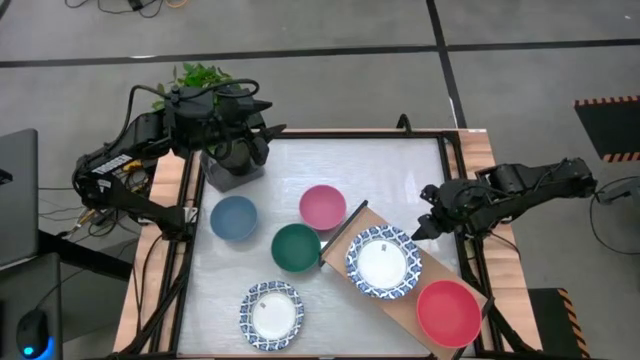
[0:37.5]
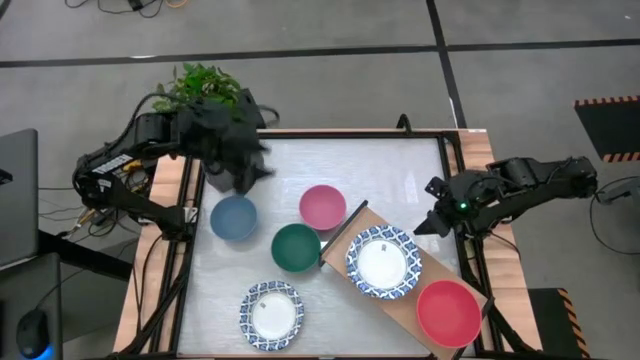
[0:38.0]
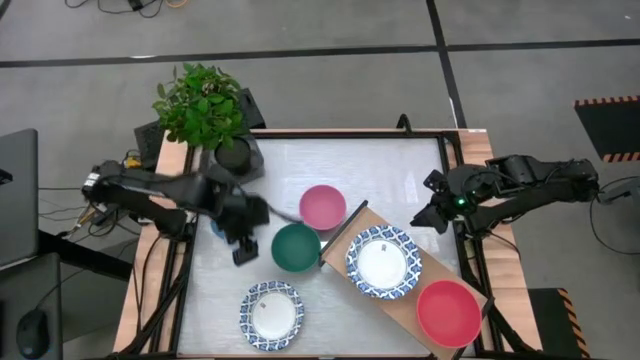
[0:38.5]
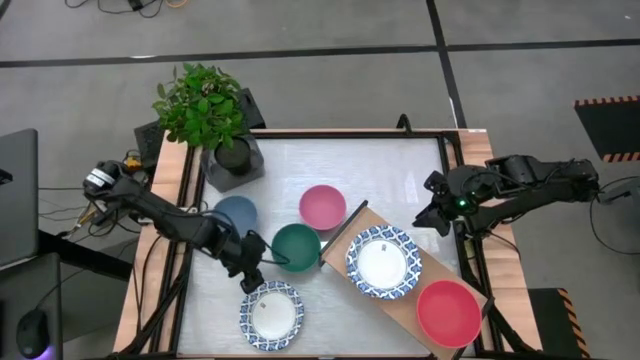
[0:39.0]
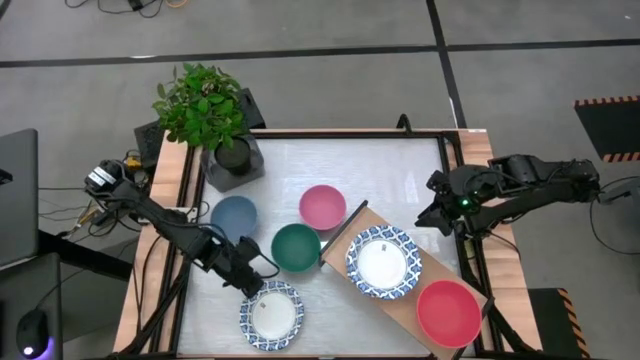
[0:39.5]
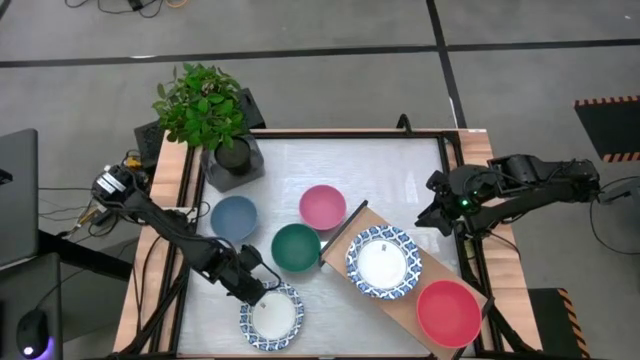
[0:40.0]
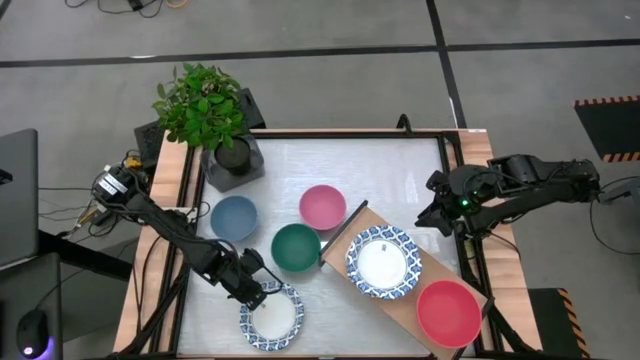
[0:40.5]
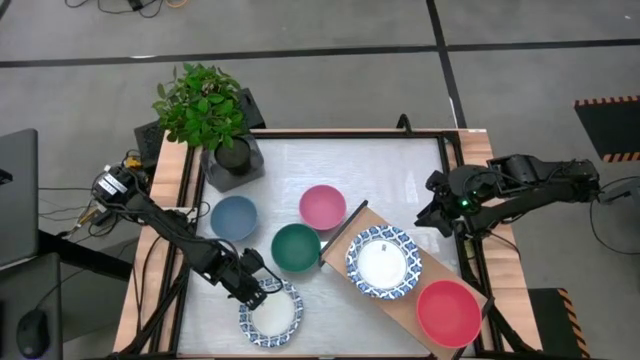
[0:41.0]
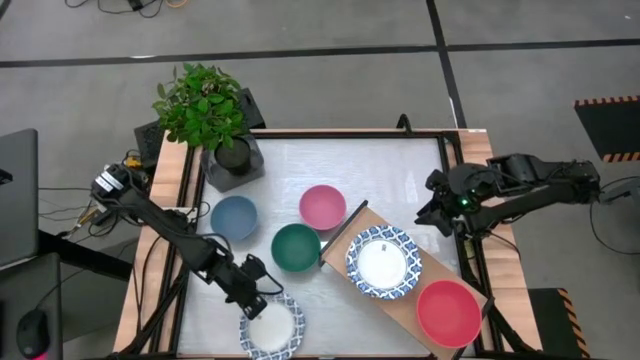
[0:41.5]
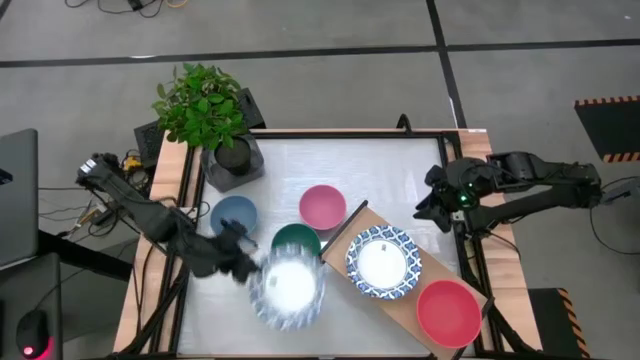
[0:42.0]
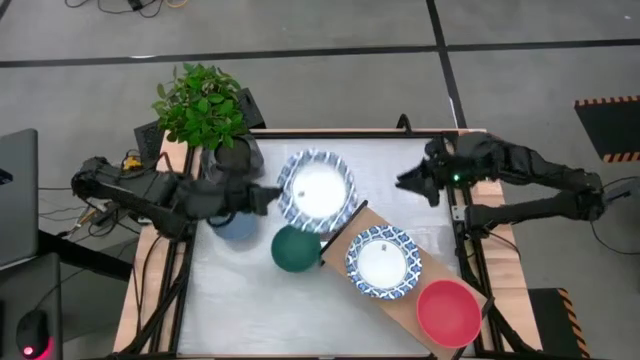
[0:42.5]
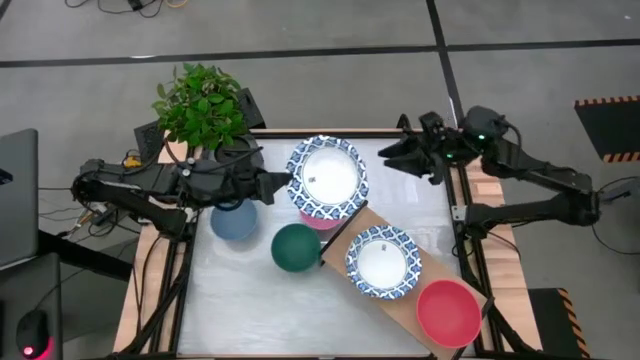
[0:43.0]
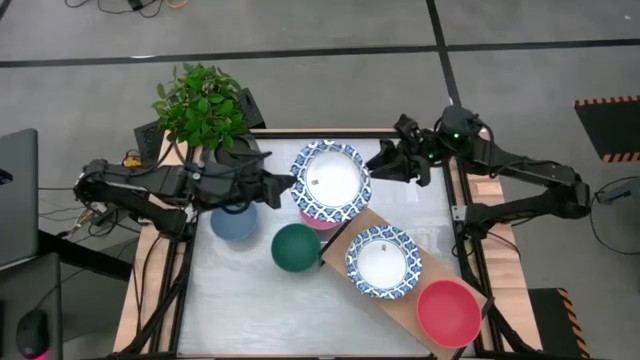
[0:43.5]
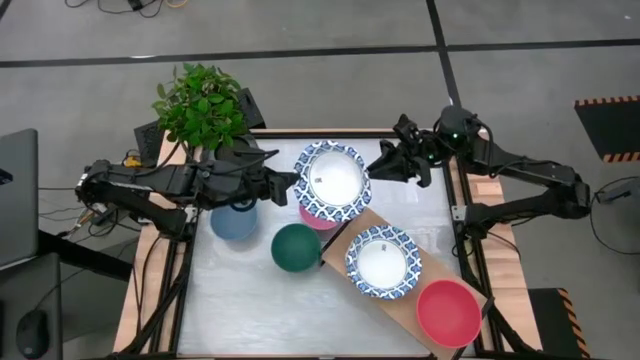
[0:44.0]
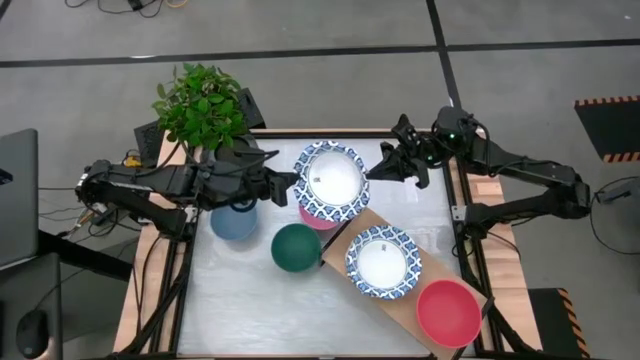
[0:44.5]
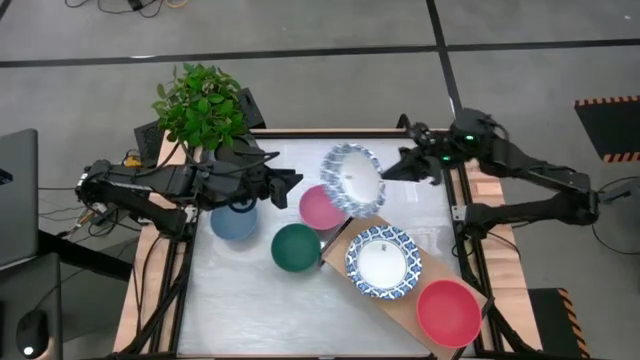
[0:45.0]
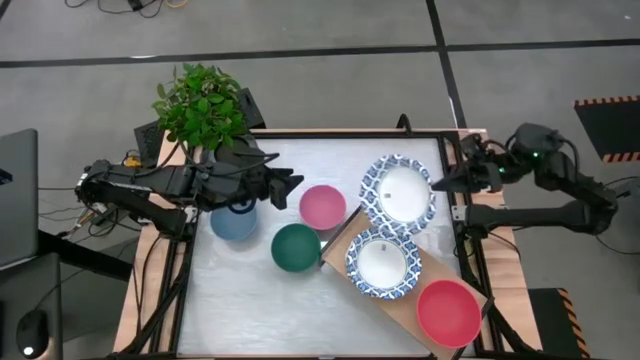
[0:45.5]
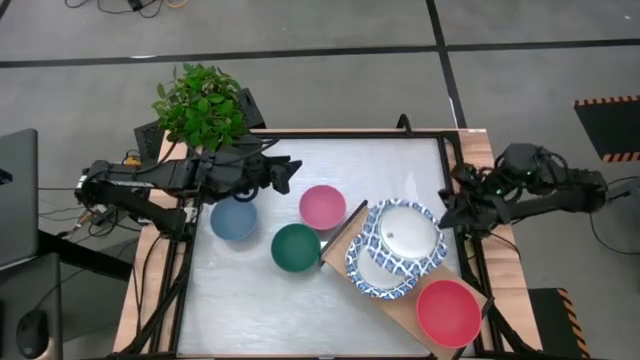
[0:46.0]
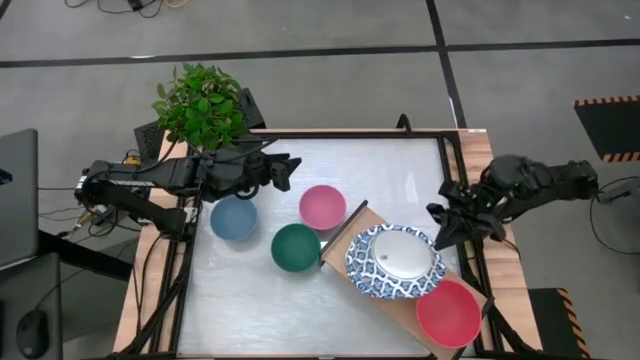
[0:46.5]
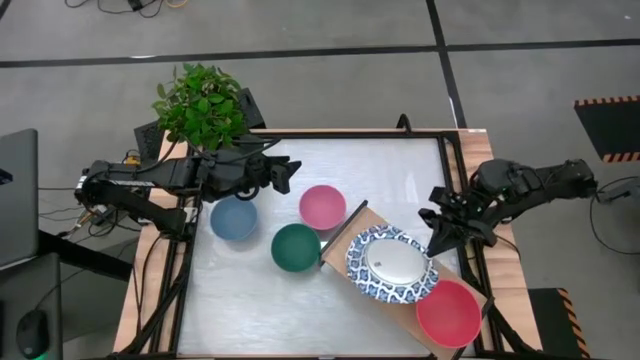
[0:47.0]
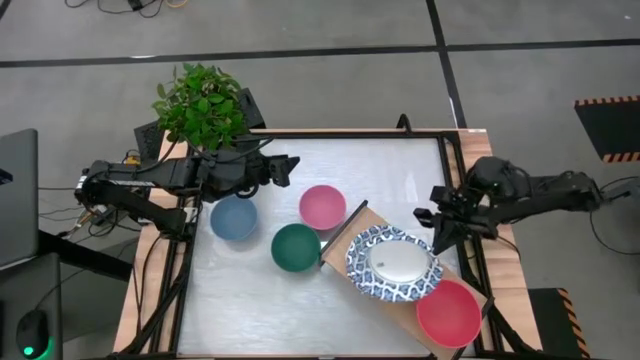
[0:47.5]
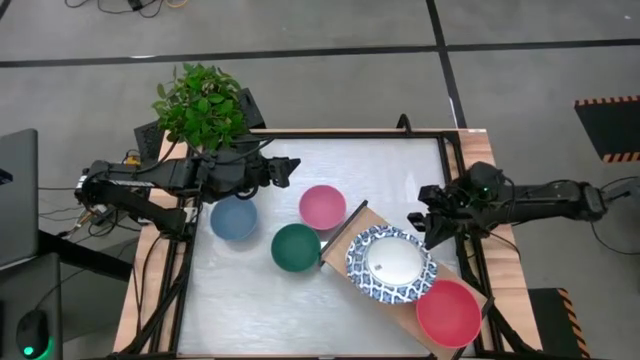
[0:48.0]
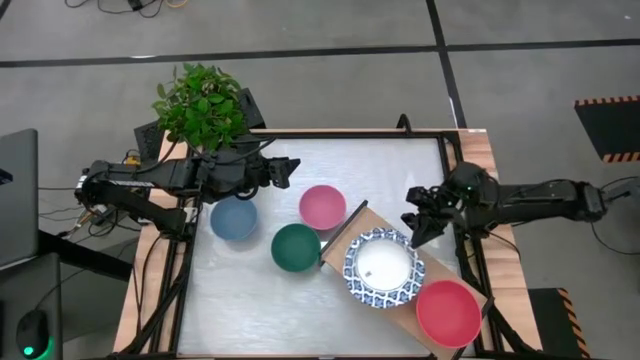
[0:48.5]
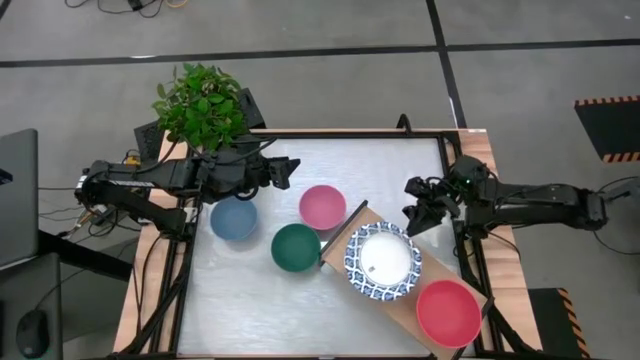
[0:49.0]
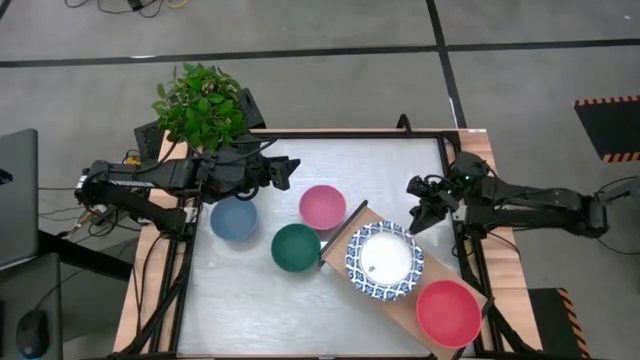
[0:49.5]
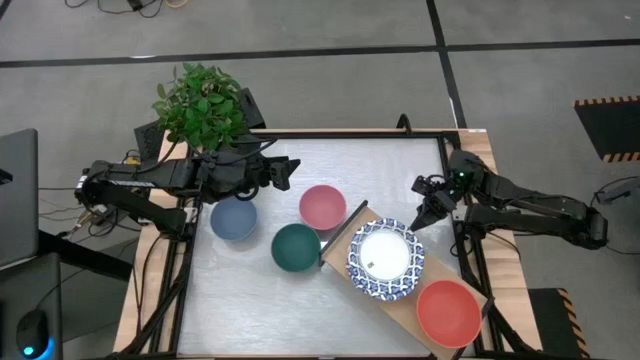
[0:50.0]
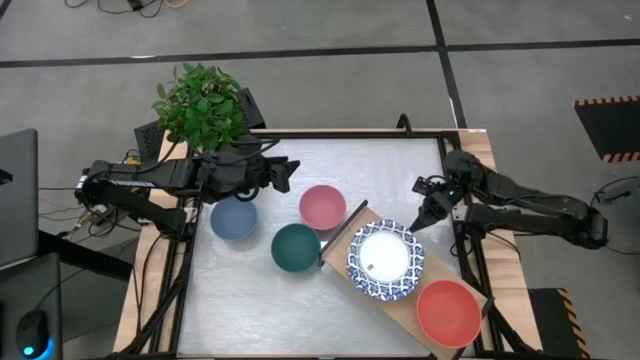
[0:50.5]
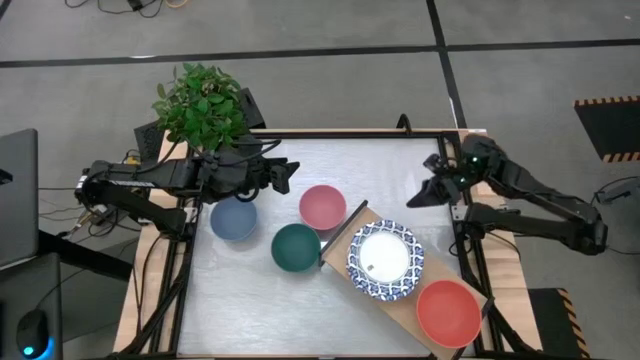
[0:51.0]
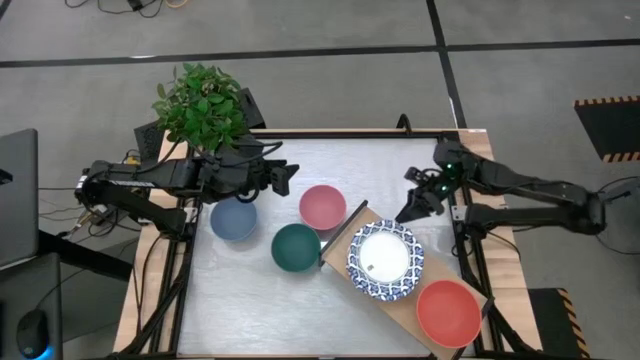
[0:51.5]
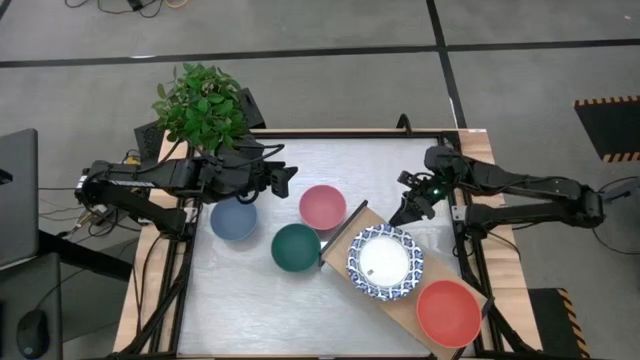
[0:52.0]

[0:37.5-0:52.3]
Task: Place and stack bowls onto a shelf
Stack the white patterned bowl on top of the white patterned bowl on the shelf

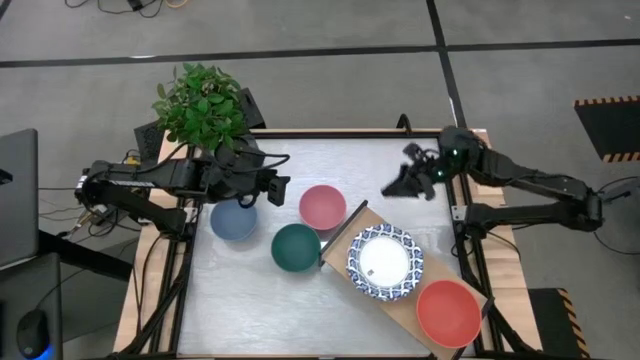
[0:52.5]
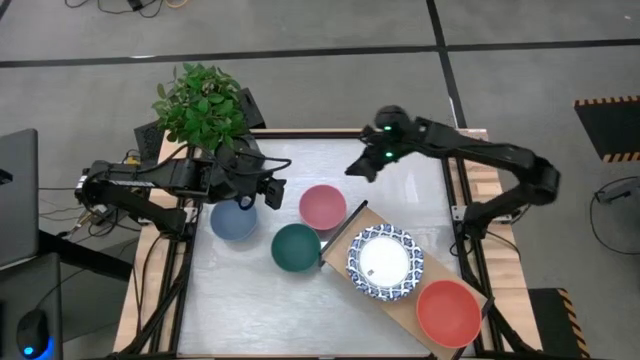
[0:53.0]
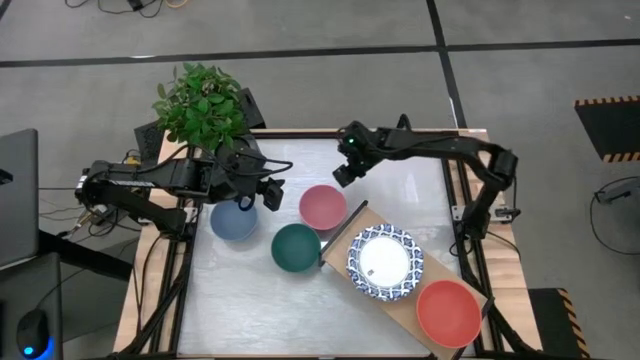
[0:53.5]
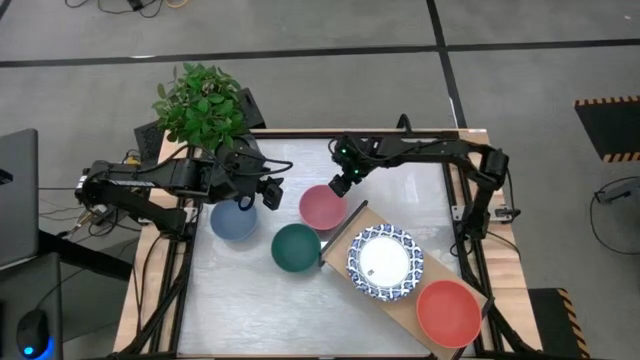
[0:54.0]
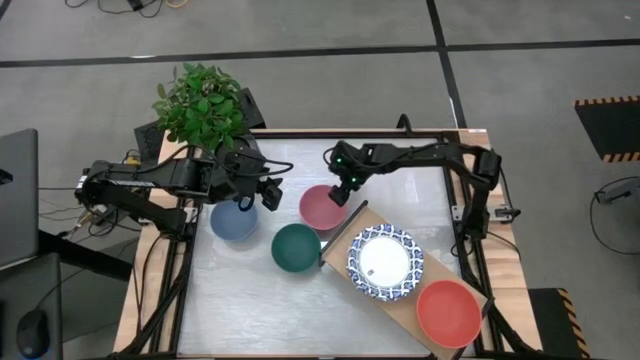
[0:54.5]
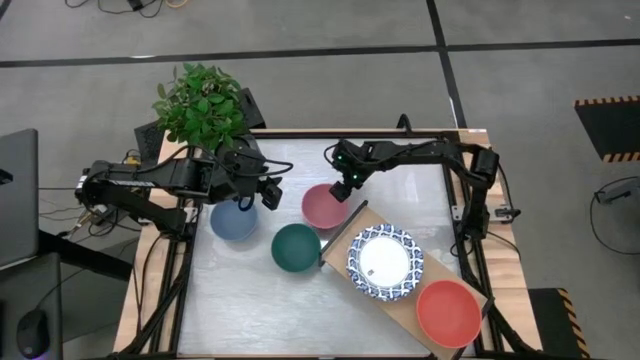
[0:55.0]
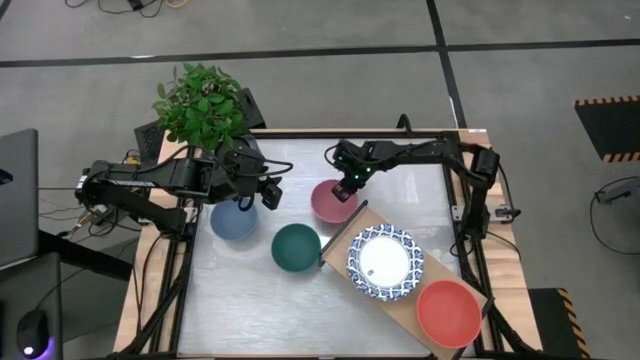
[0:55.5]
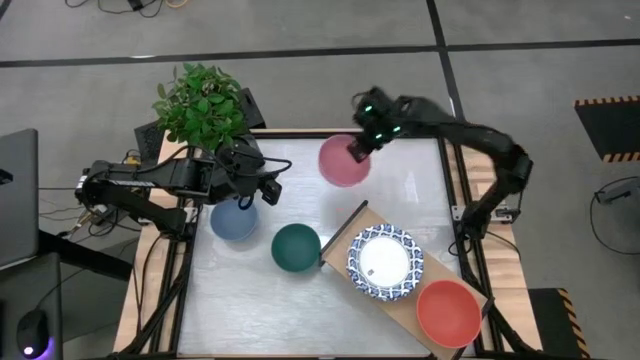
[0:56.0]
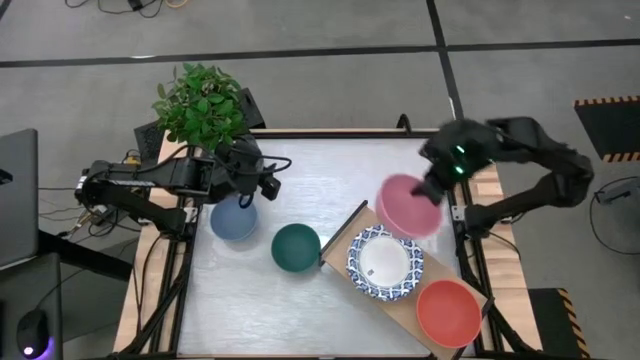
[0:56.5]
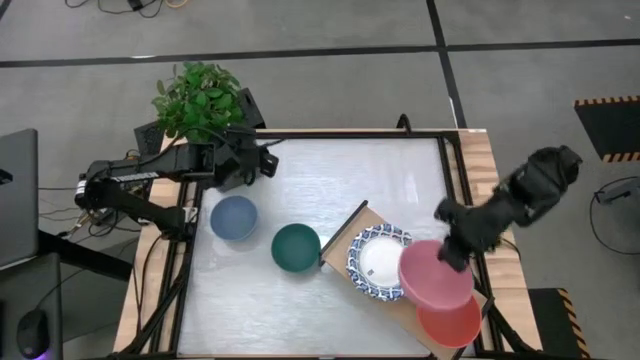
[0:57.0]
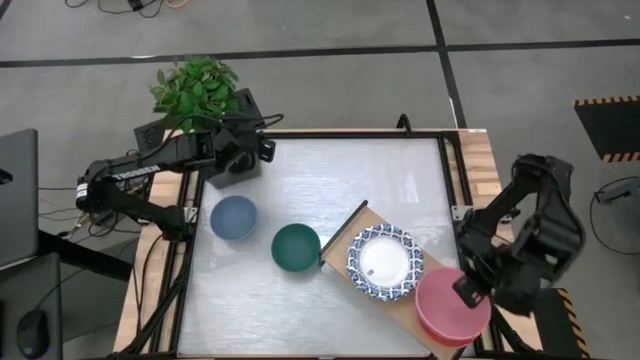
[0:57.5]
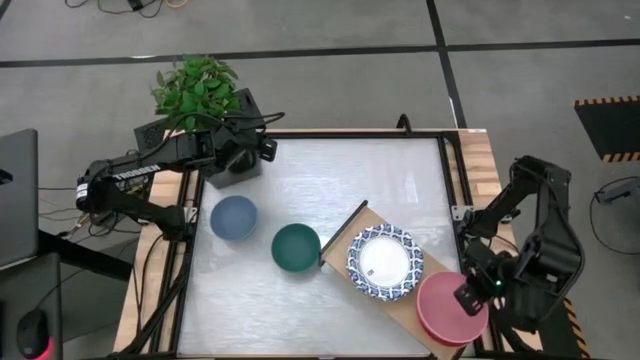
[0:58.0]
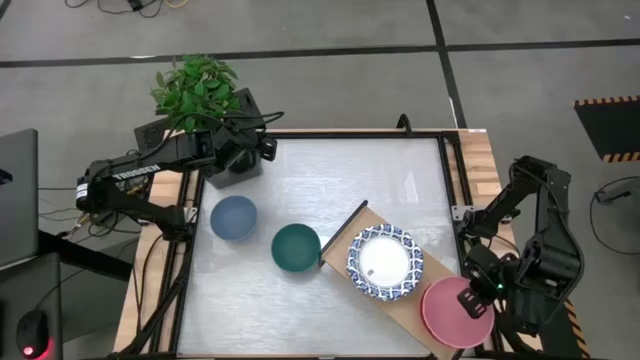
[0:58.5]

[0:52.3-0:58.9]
Stack the pink bowl on top of the orange bowl on the shelf

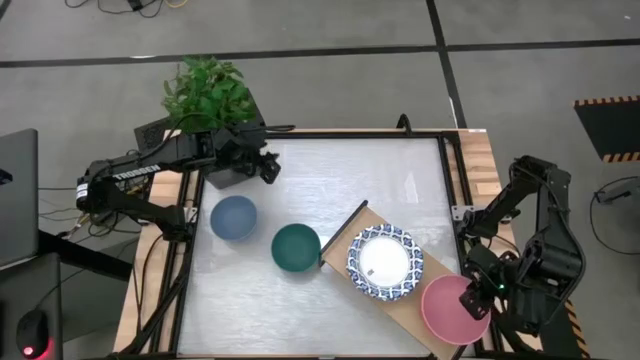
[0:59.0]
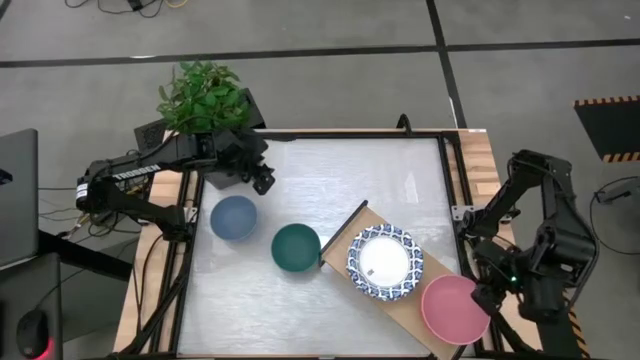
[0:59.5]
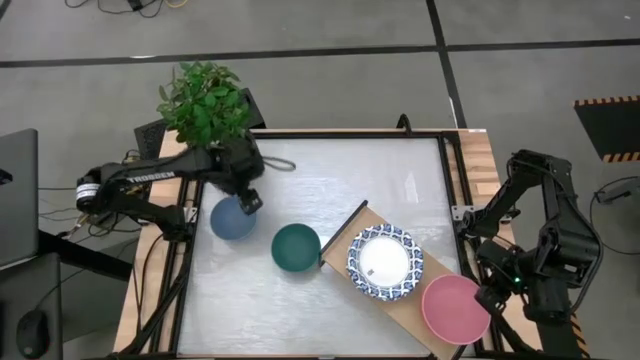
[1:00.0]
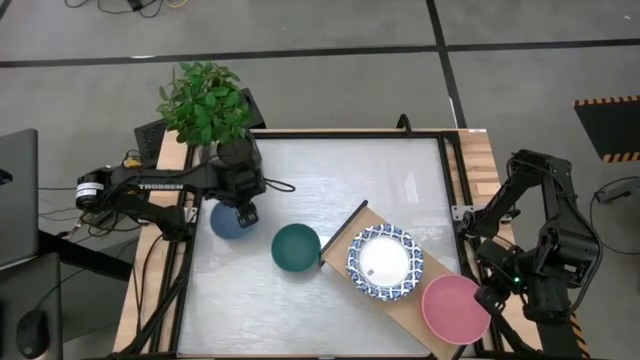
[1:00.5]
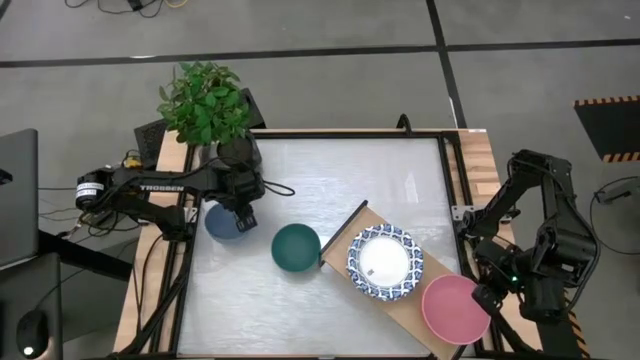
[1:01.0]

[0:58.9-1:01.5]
Stack the blue bowl on top of the pink bowl on the shelf
